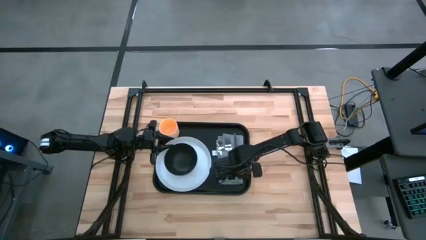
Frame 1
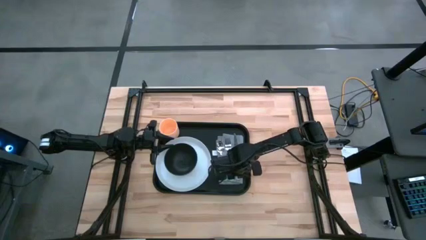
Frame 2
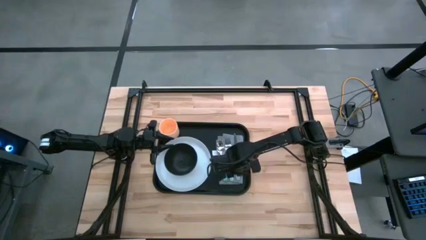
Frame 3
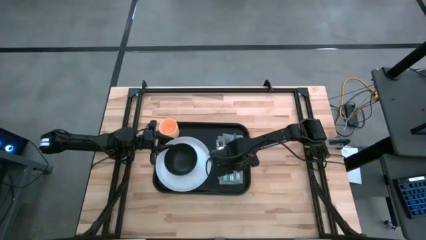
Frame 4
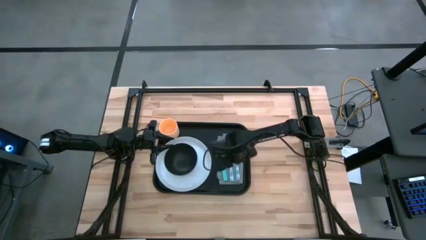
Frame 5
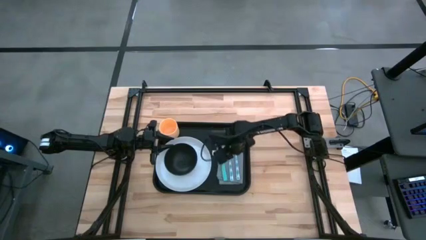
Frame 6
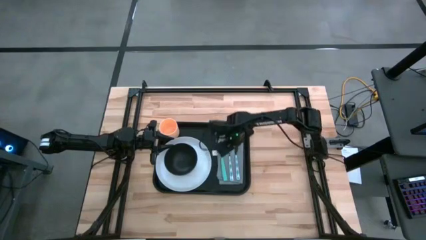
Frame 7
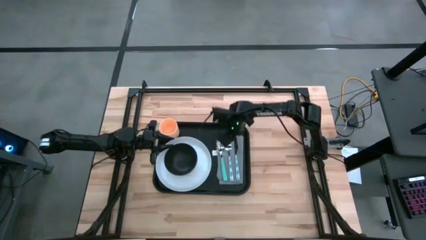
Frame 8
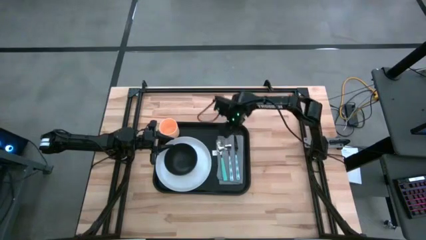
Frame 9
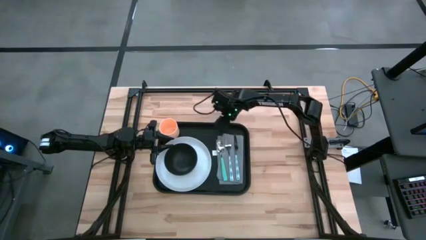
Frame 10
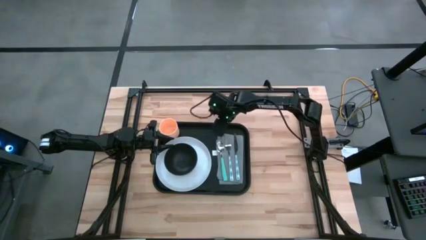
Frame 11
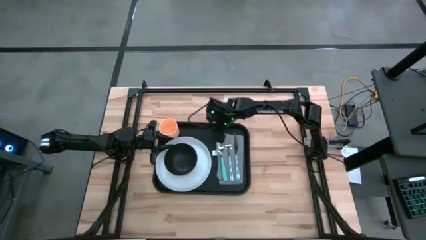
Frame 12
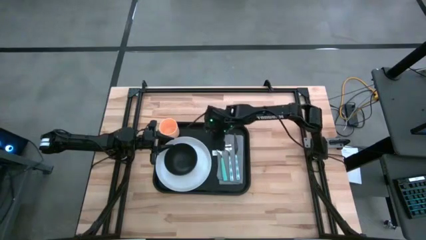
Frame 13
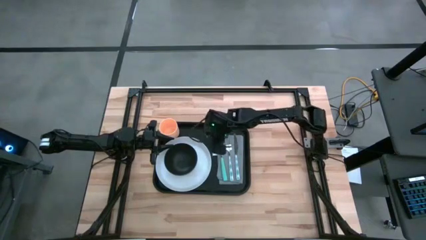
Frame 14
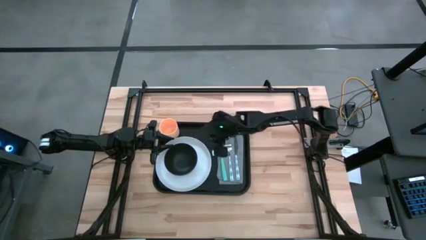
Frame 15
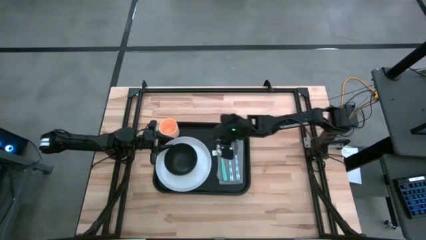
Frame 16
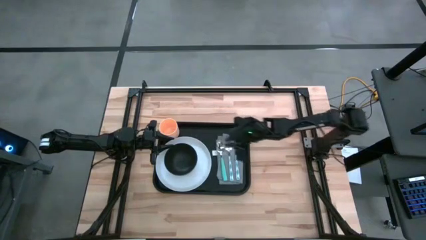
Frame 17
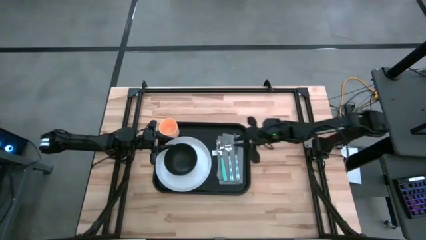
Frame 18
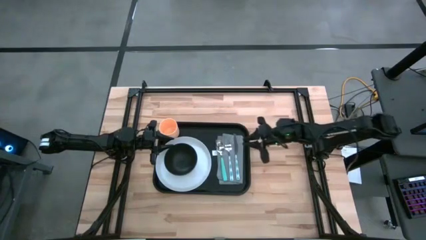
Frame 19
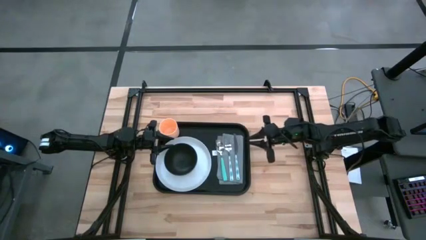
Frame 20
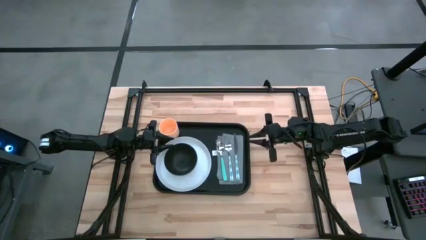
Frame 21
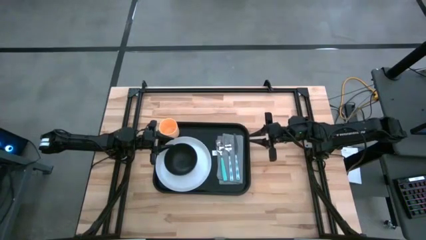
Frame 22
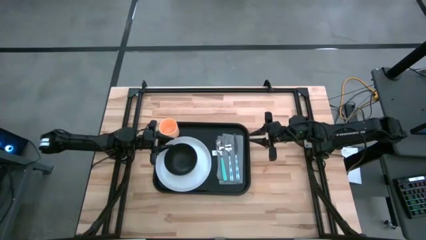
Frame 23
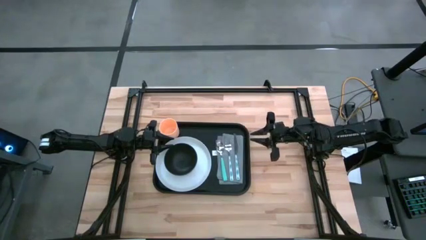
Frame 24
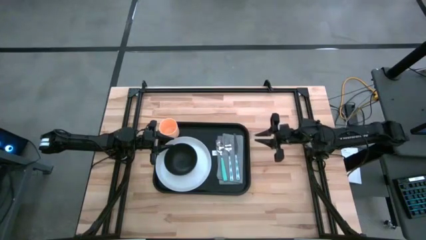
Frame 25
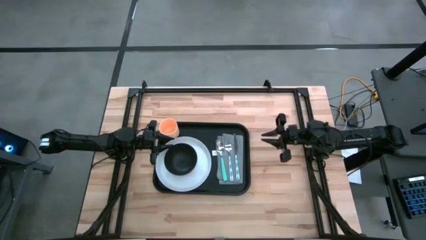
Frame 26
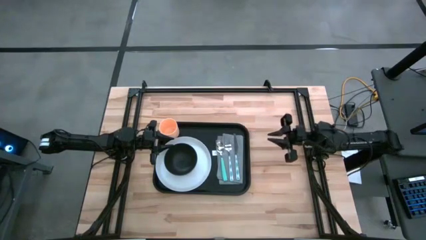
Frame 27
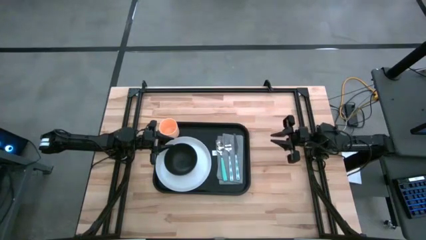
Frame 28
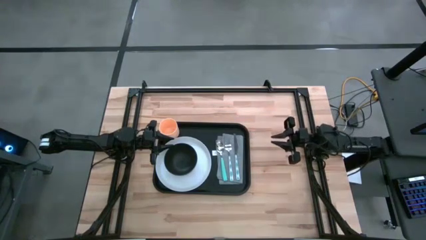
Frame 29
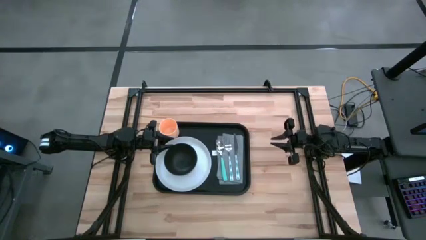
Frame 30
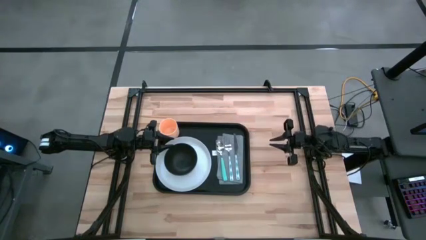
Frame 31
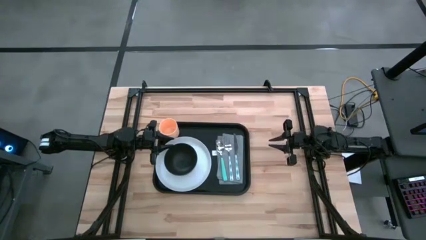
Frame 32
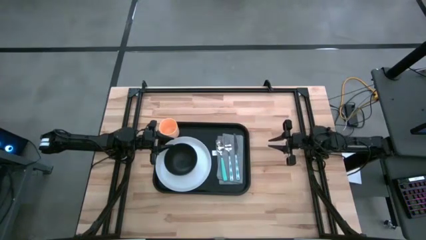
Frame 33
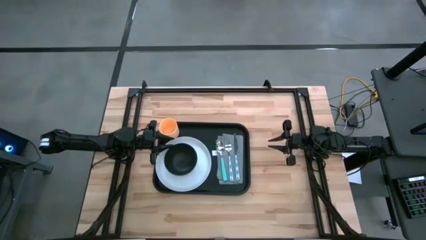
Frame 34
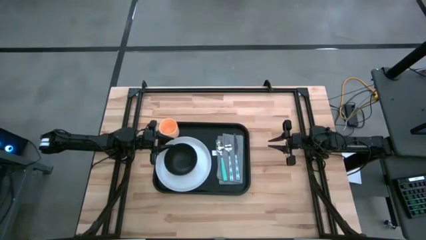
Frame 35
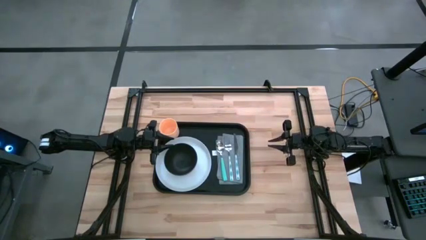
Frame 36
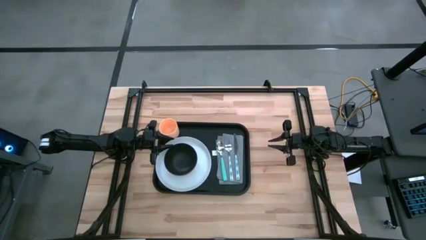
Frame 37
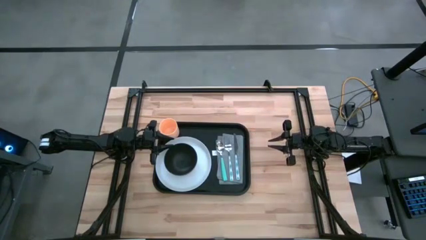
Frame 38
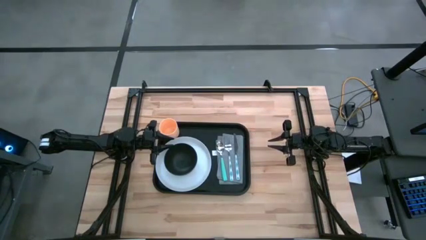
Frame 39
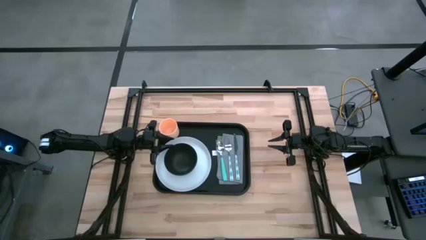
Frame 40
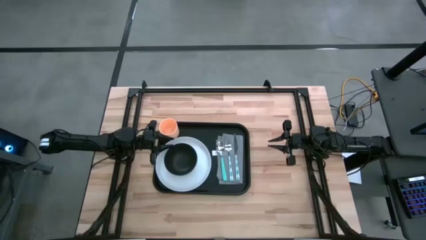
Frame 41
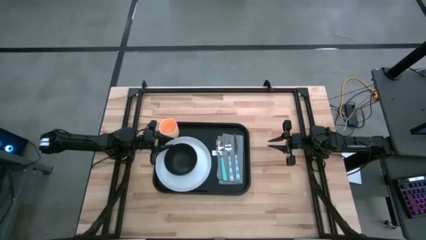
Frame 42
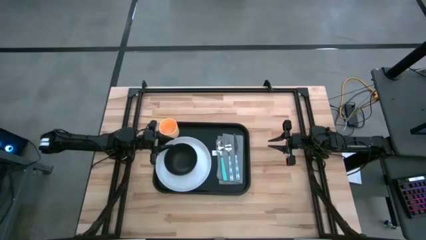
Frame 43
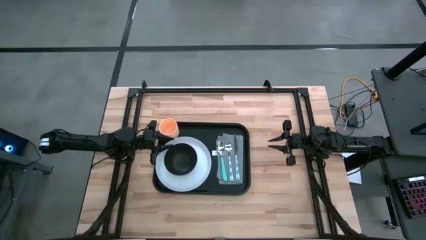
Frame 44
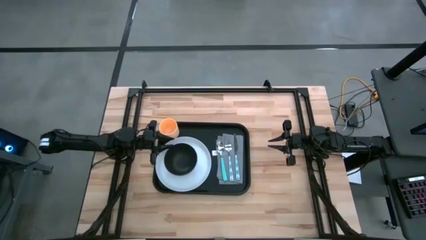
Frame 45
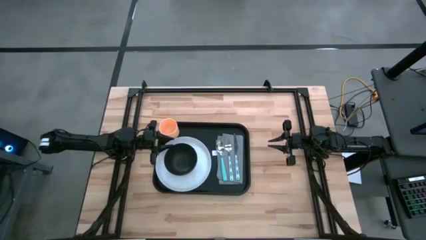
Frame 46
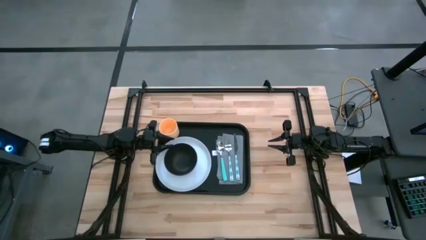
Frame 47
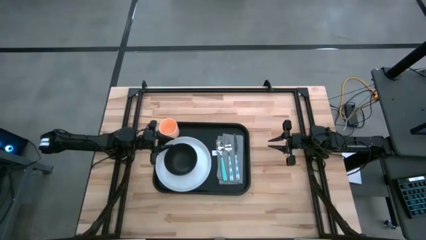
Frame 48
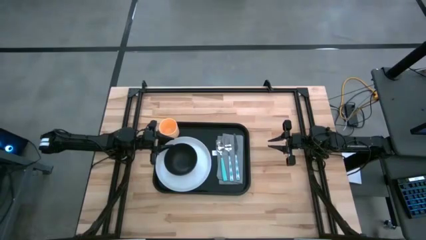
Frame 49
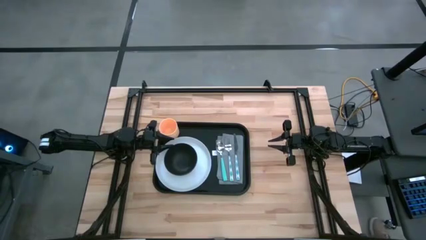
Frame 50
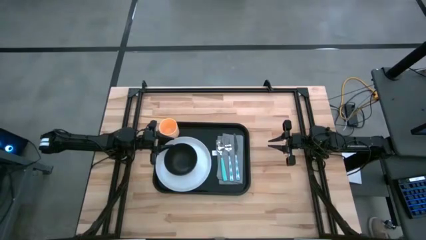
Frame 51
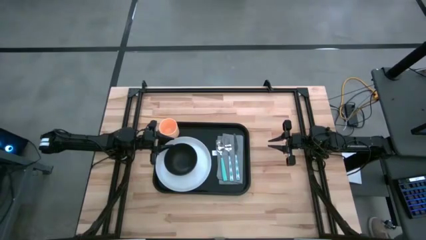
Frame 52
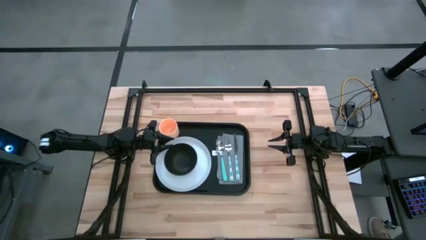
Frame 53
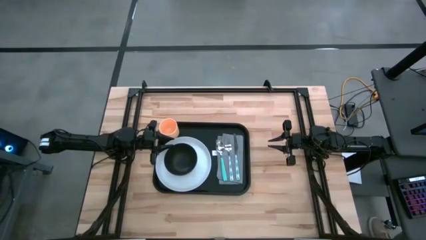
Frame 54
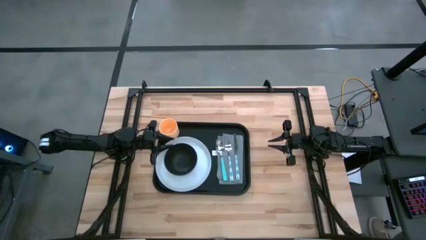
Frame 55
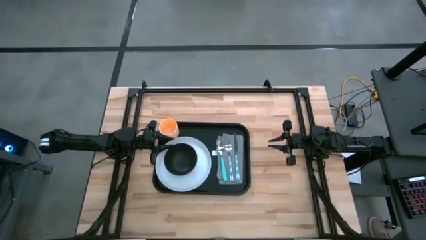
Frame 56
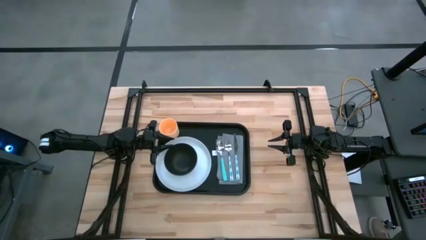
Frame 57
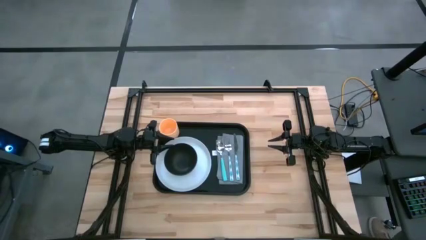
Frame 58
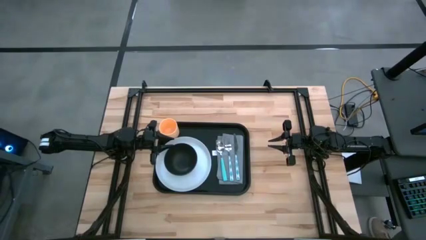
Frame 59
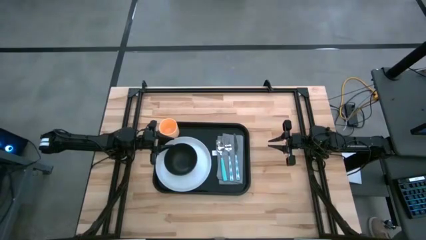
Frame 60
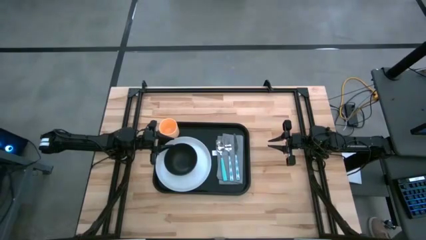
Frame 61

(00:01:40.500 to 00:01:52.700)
Task: Set up tray
Return to Home Position
